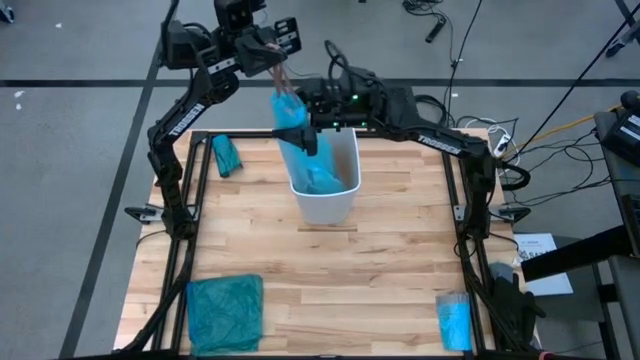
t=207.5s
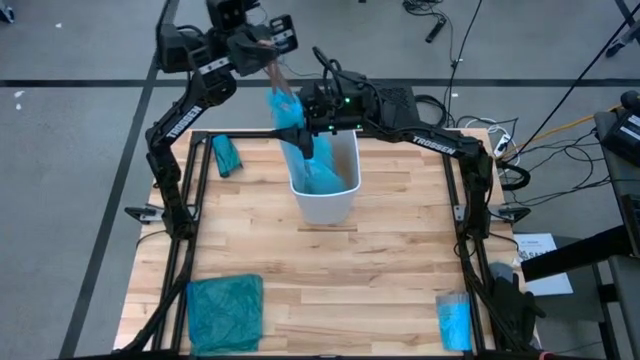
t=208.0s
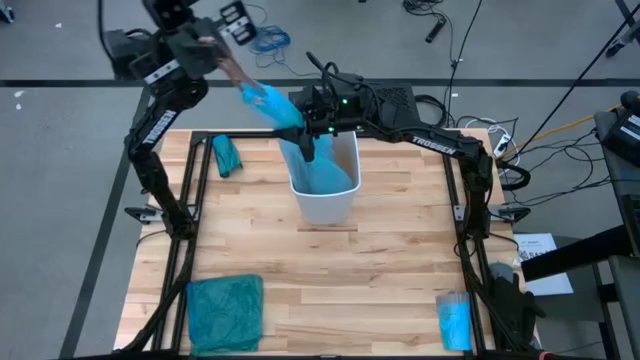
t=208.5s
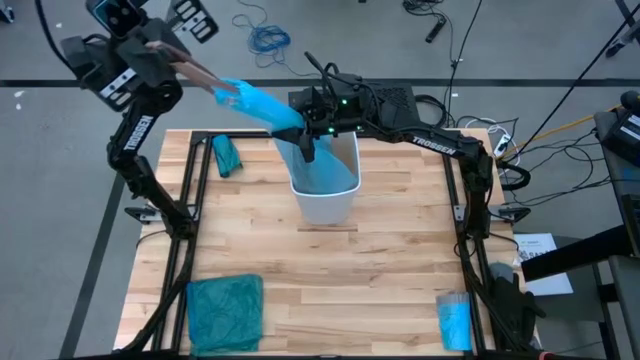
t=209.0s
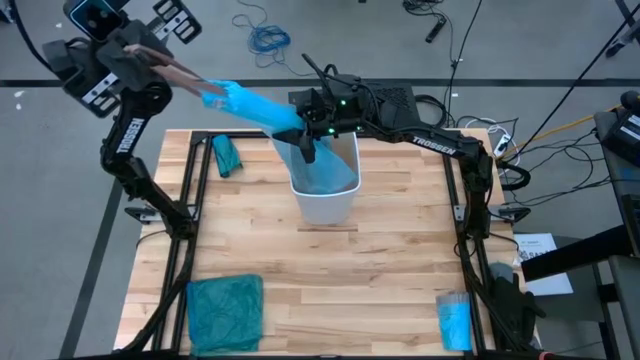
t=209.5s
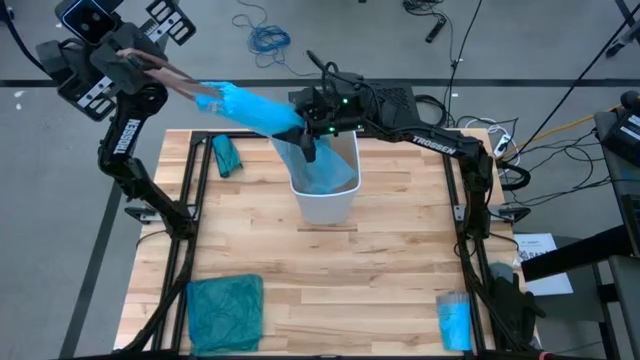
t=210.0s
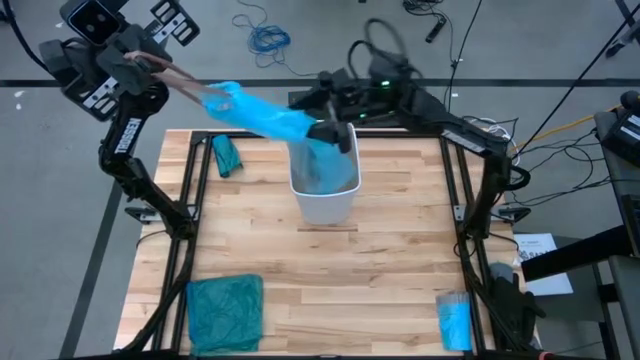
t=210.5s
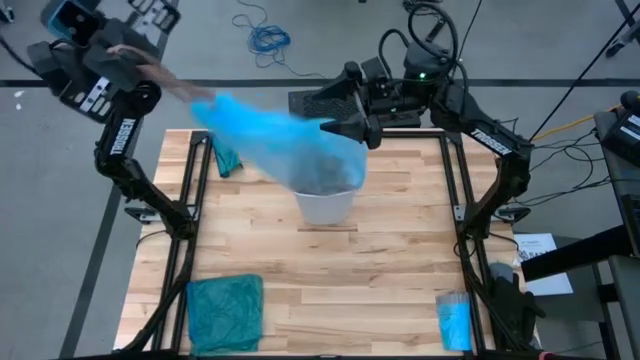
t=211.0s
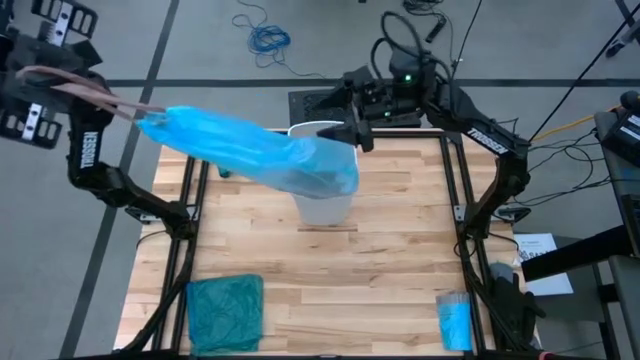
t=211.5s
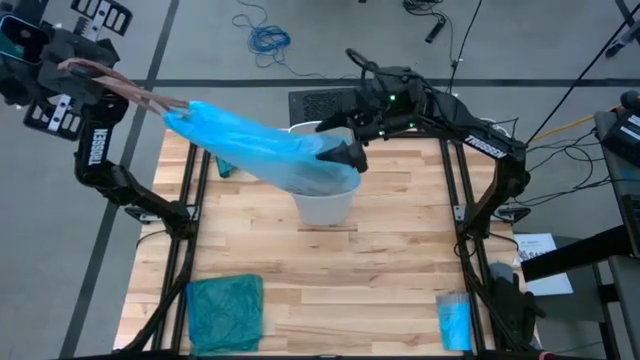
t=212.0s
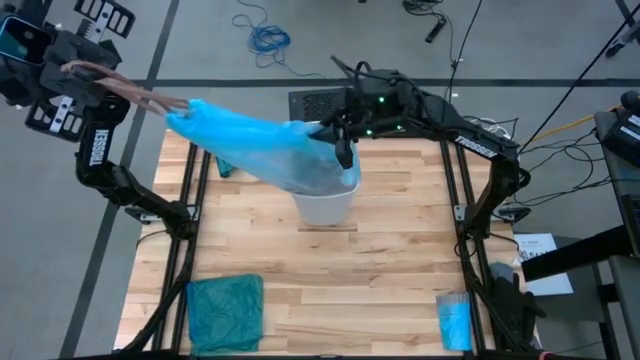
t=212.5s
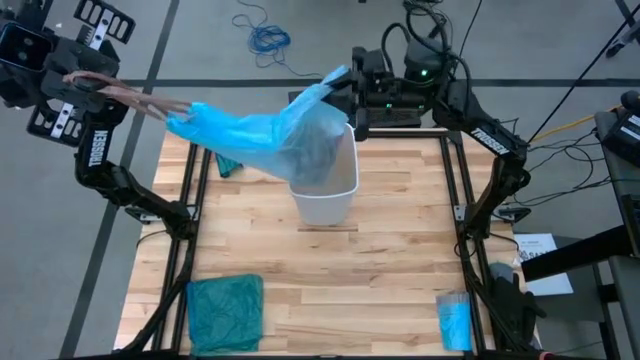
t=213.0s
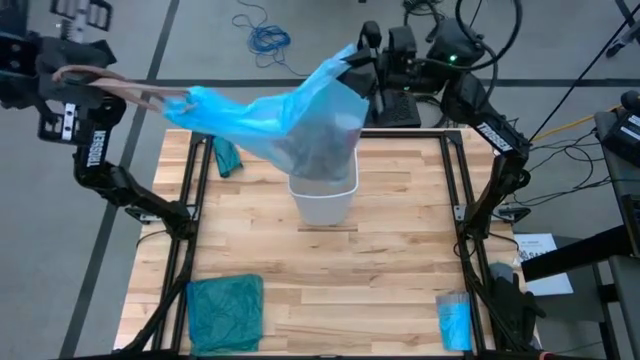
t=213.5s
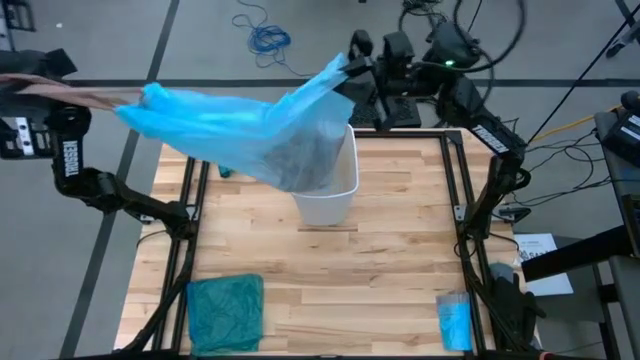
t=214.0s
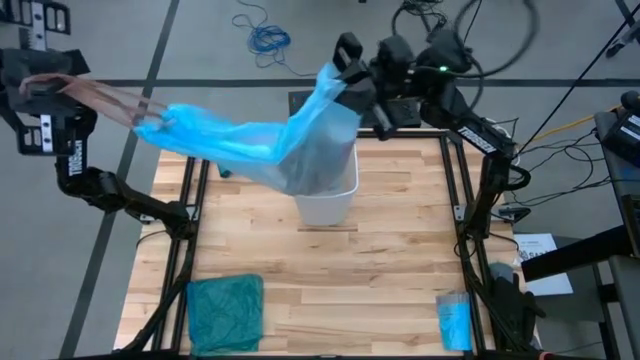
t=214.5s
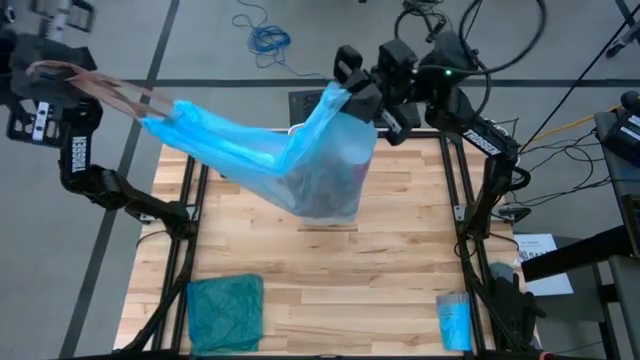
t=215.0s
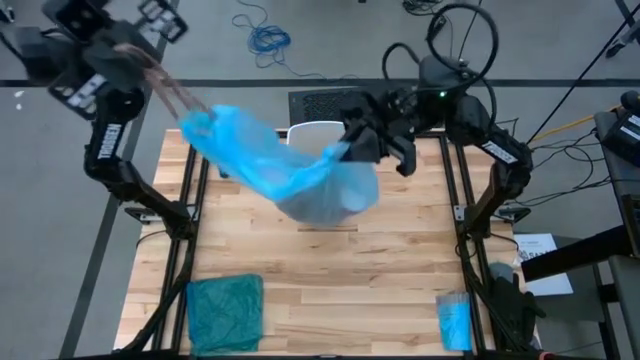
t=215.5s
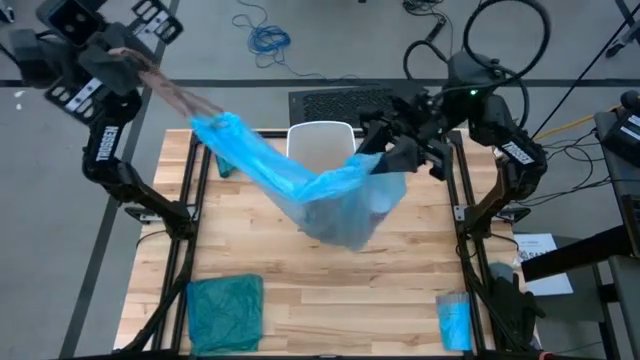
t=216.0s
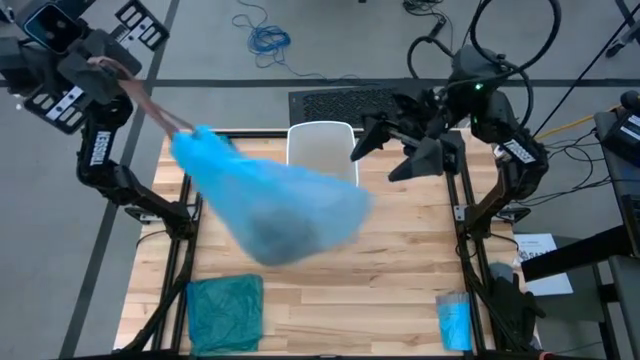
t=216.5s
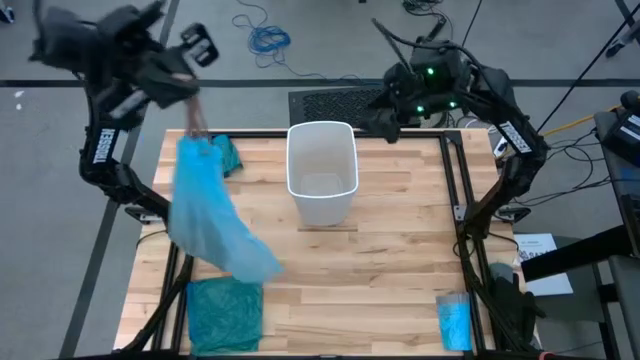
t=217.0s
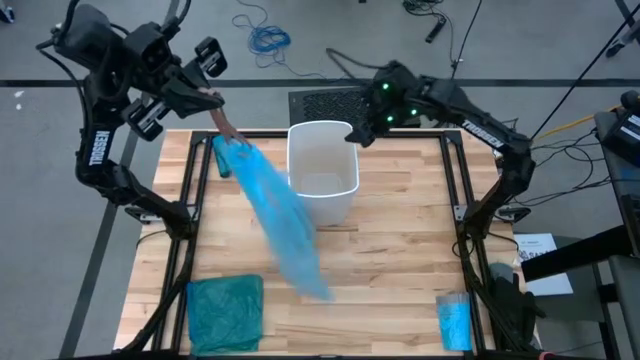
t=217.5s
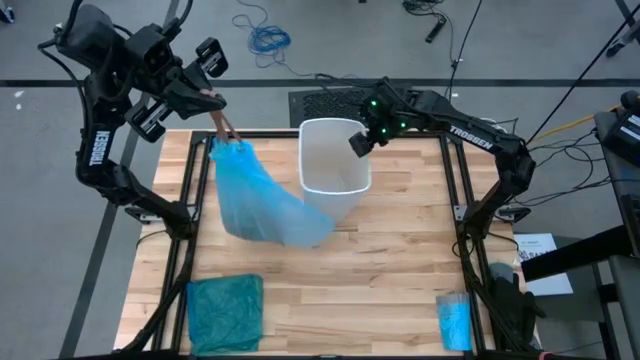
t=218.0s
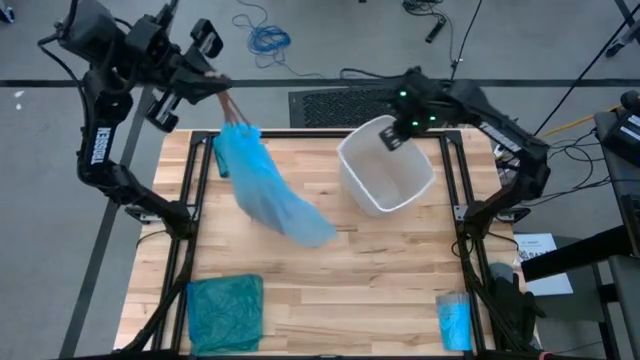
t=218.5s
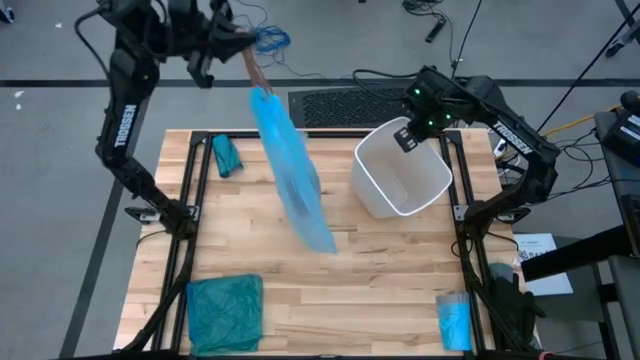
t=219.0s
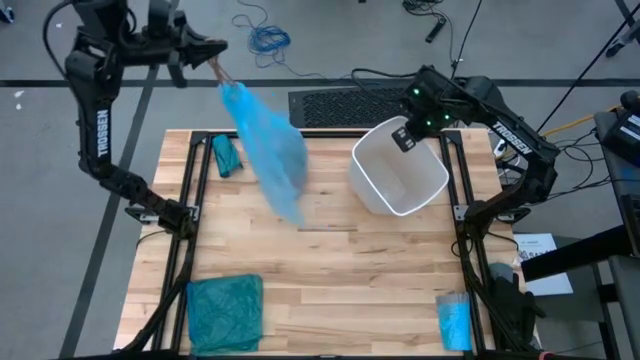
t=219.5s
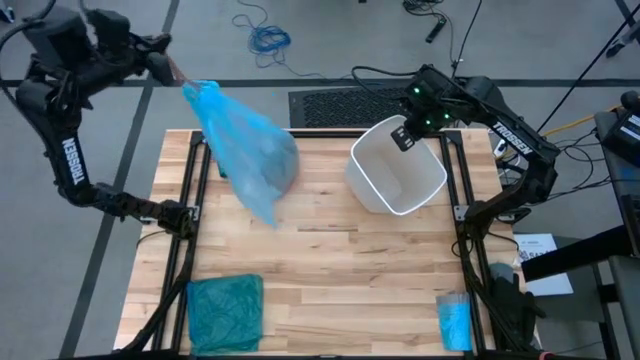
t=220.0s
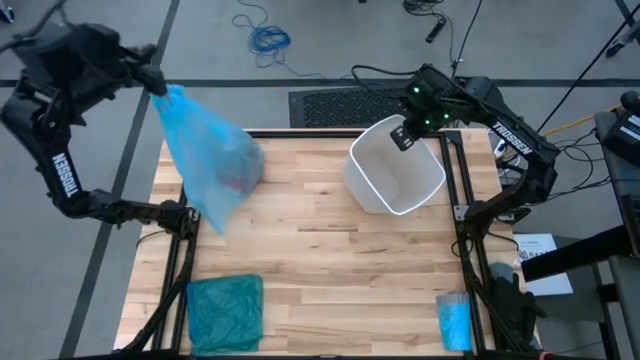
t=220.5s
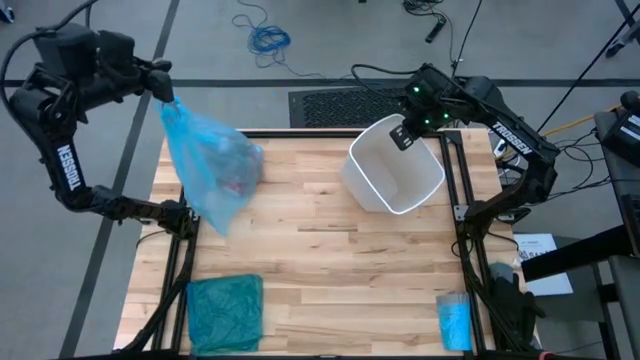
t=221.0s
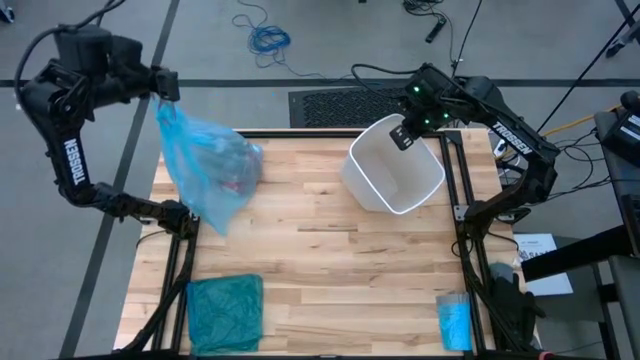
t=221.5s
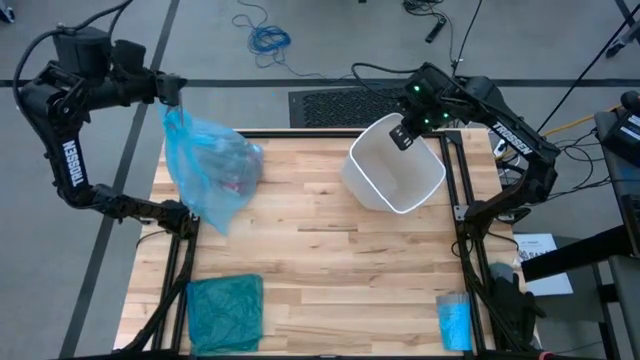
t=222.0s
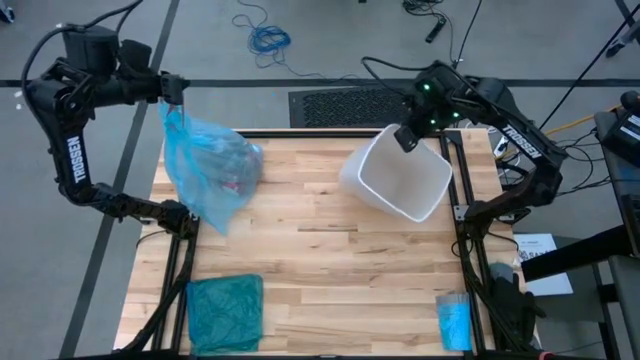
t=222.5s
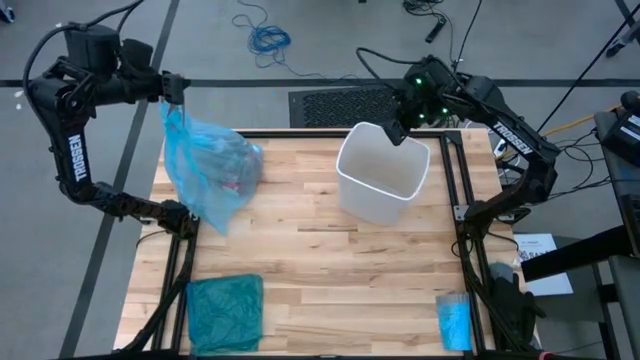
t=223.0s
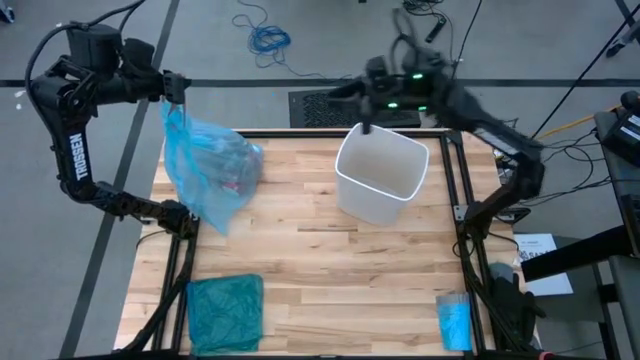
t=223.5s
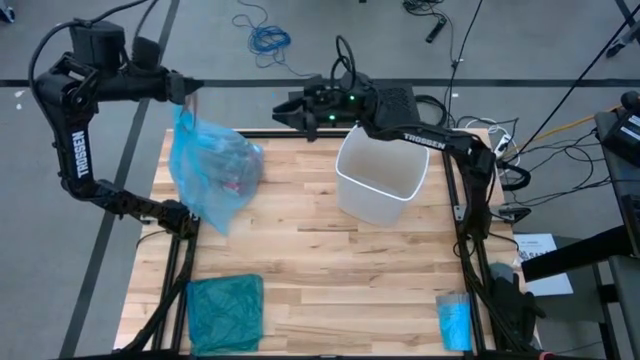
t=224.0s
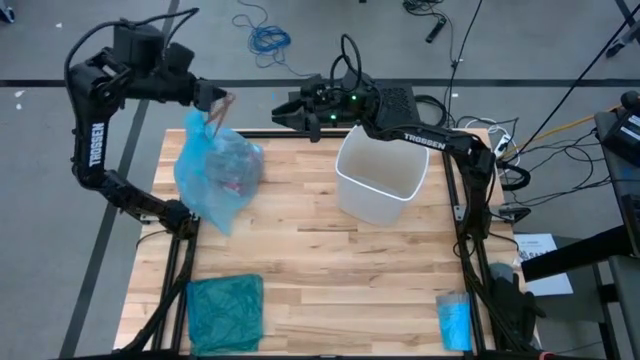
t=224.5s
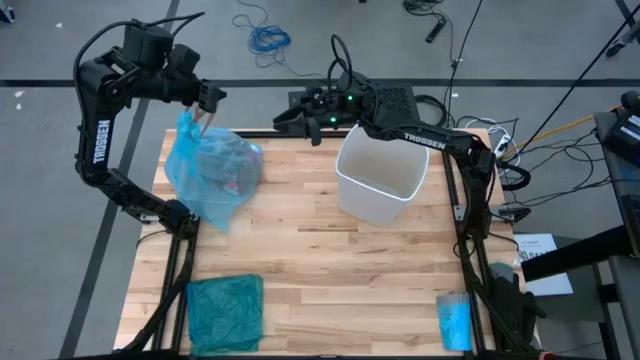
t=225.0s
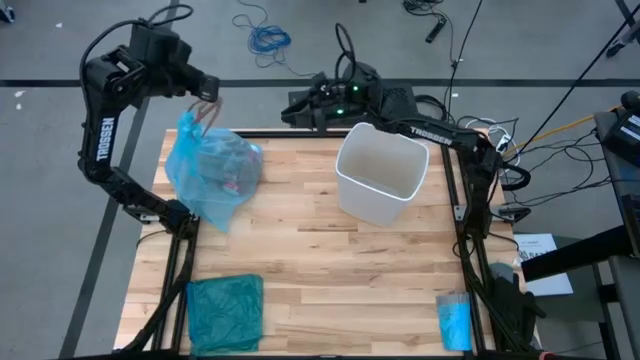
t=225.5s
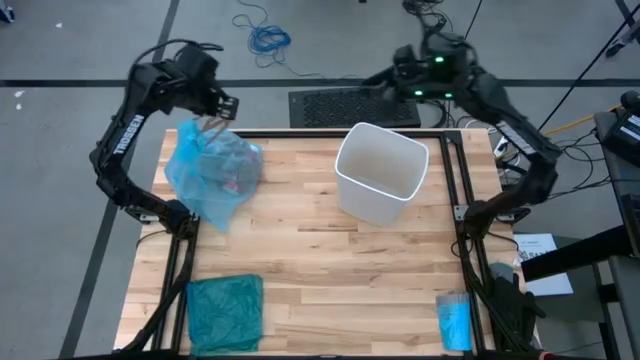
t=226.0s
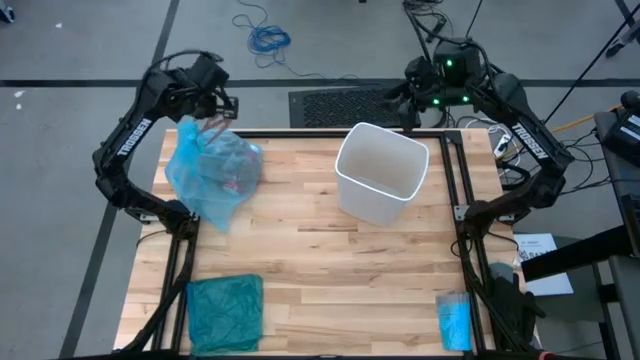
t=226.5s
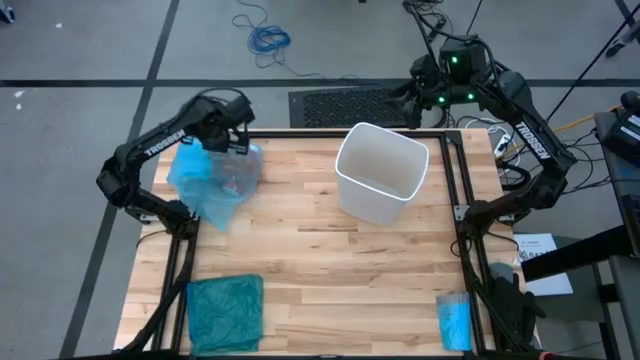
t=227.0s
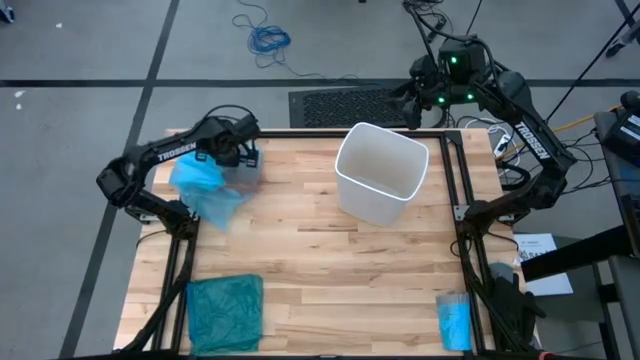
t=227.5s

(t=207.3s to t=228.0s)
Task: place trash/remove bag and relplace
Remove the blue trash bag from the white trash bin
